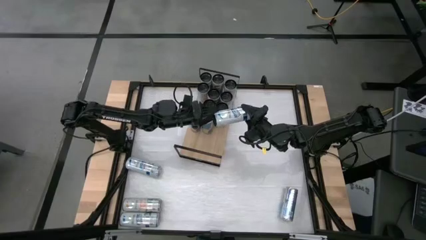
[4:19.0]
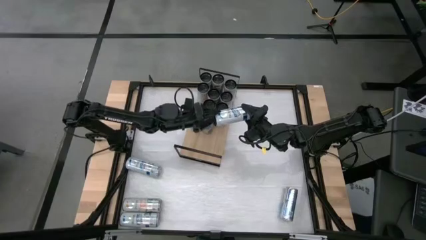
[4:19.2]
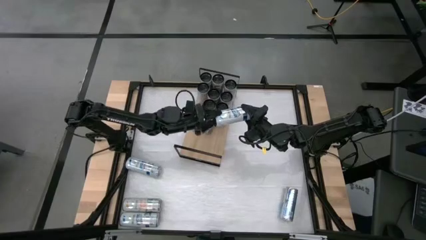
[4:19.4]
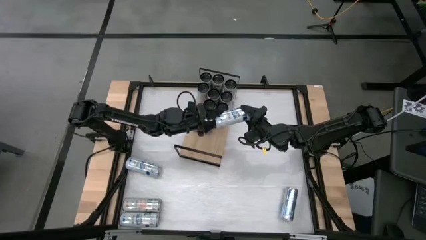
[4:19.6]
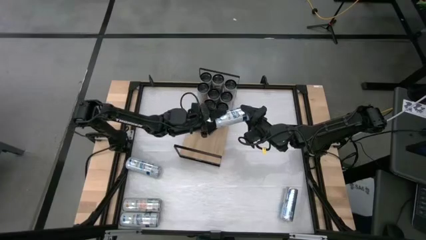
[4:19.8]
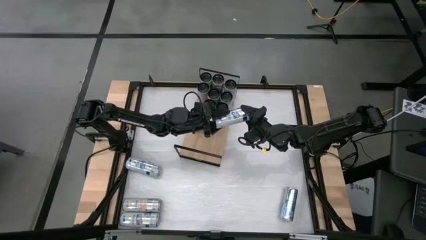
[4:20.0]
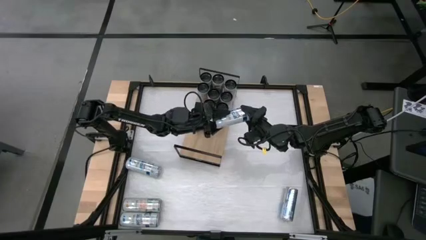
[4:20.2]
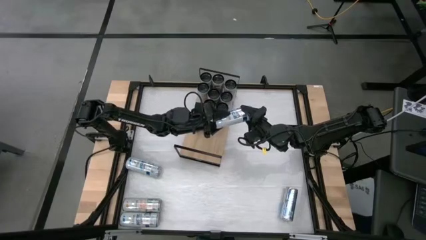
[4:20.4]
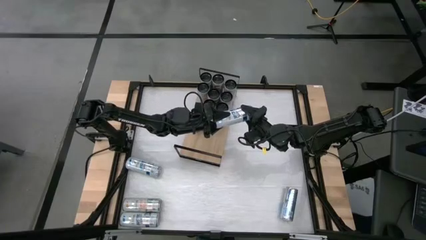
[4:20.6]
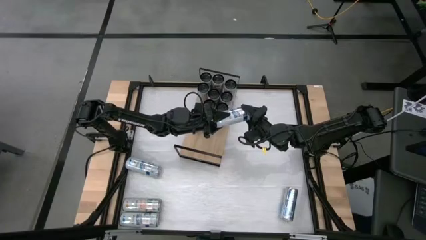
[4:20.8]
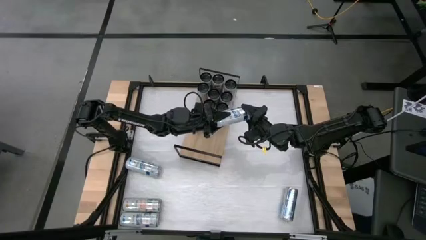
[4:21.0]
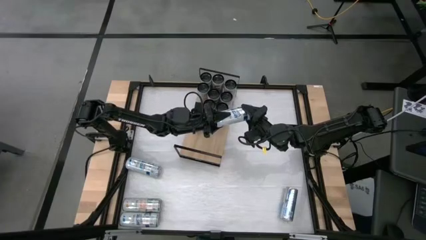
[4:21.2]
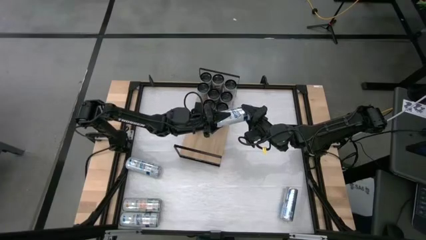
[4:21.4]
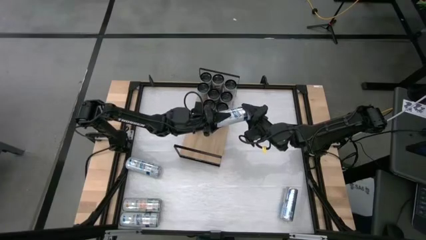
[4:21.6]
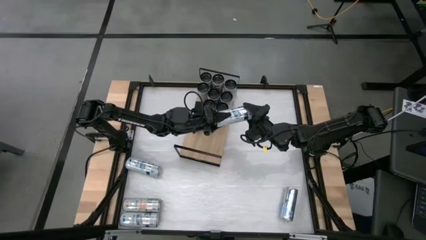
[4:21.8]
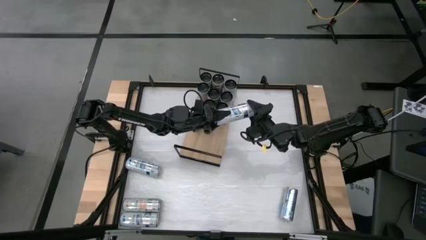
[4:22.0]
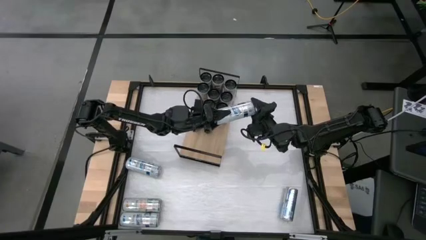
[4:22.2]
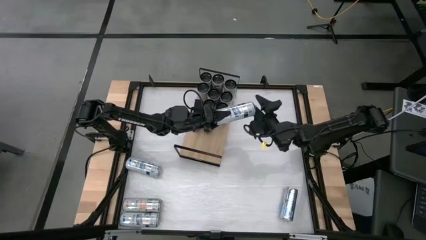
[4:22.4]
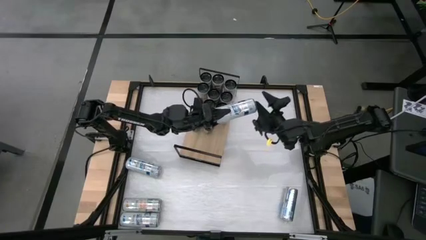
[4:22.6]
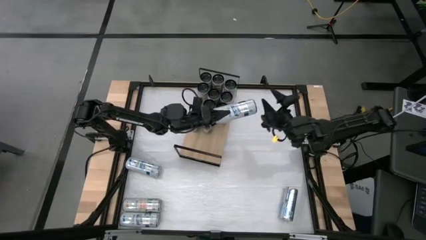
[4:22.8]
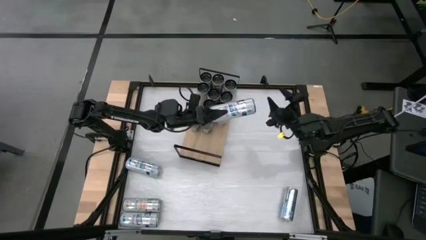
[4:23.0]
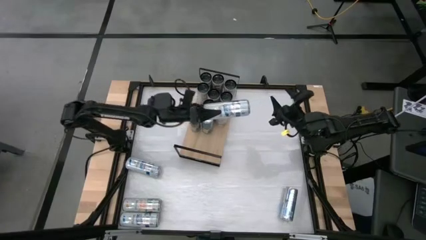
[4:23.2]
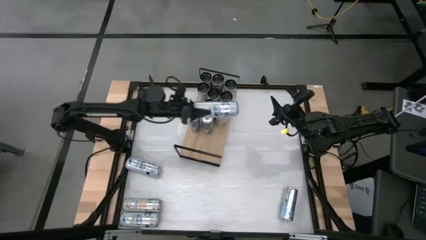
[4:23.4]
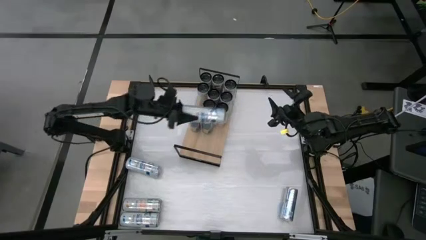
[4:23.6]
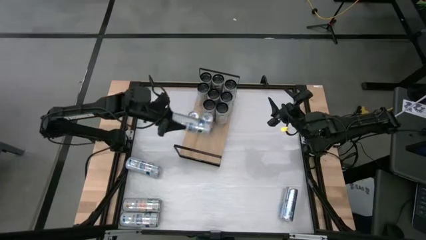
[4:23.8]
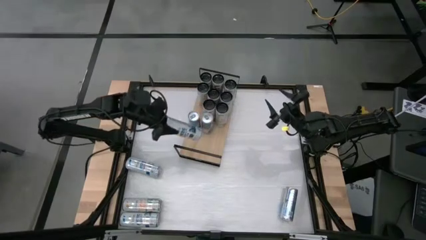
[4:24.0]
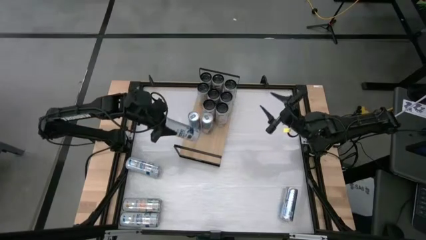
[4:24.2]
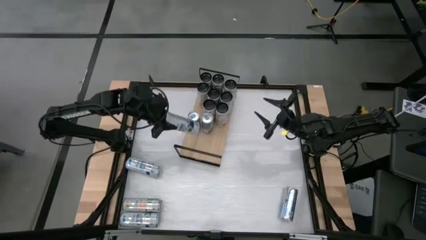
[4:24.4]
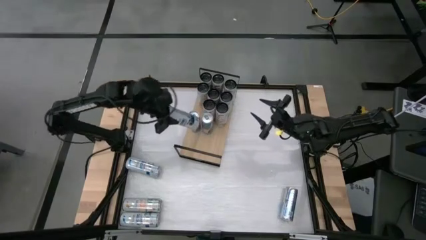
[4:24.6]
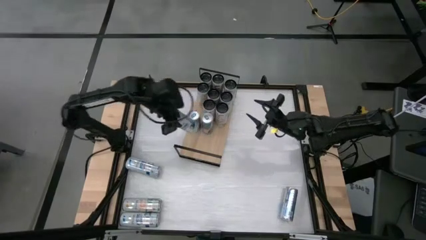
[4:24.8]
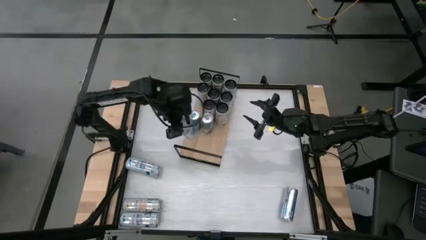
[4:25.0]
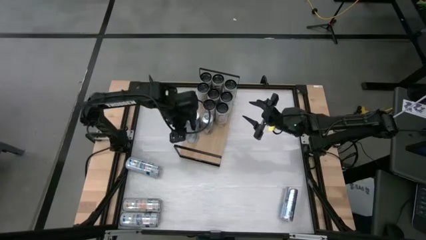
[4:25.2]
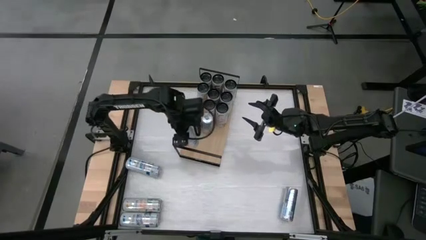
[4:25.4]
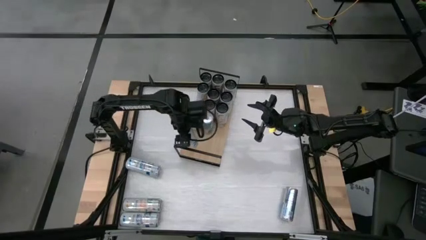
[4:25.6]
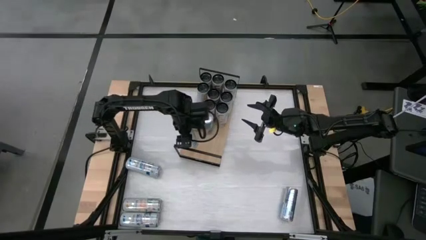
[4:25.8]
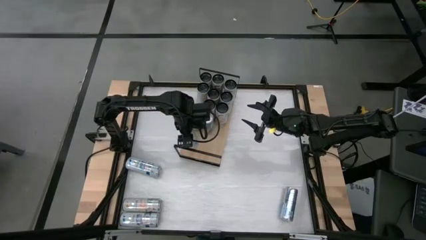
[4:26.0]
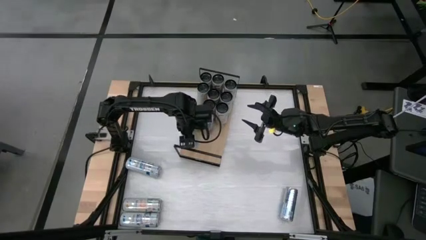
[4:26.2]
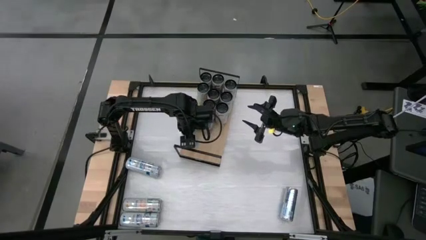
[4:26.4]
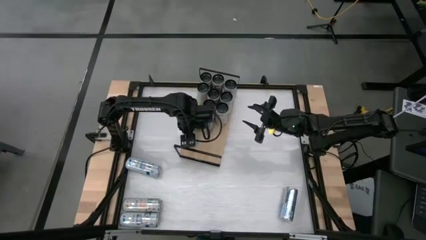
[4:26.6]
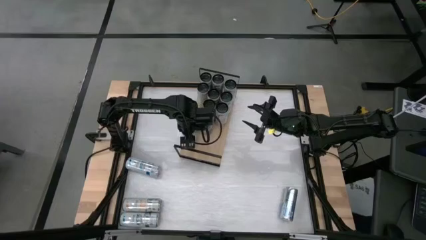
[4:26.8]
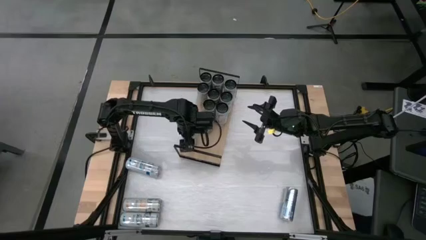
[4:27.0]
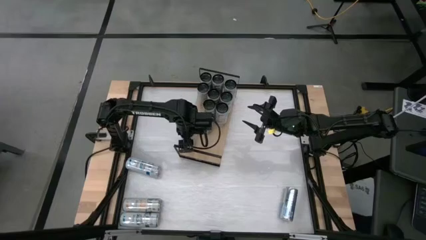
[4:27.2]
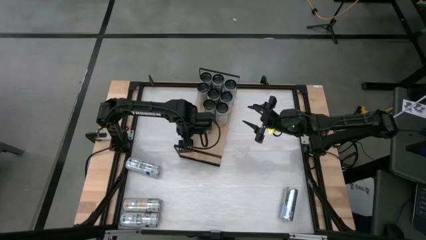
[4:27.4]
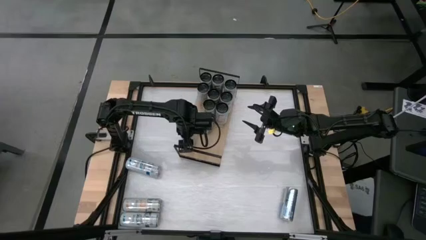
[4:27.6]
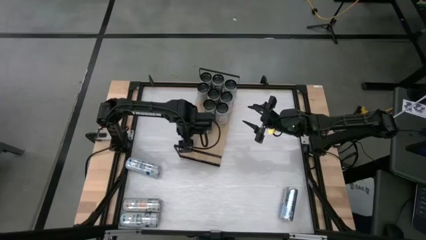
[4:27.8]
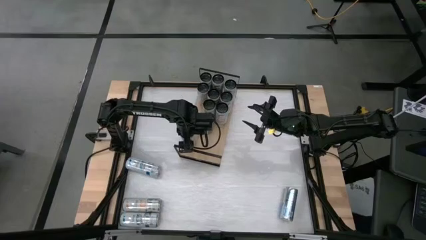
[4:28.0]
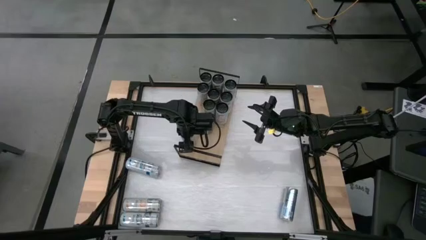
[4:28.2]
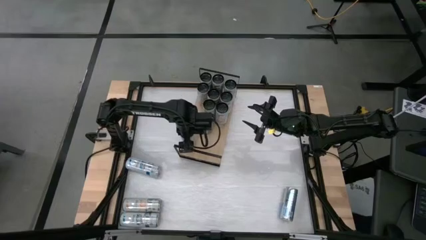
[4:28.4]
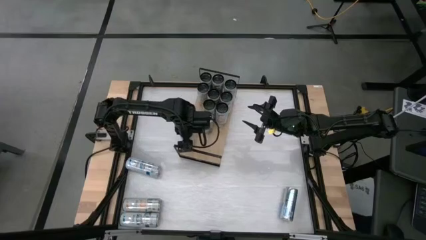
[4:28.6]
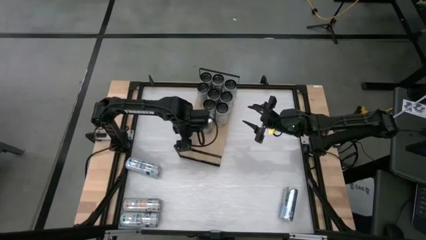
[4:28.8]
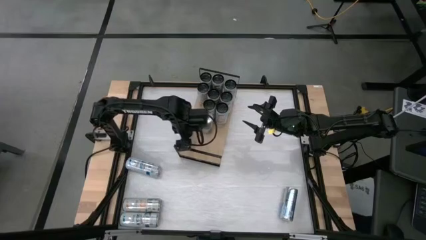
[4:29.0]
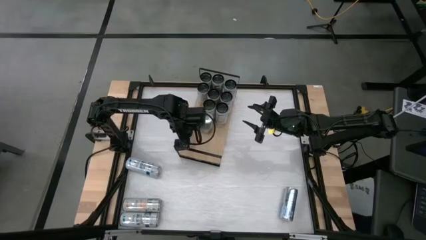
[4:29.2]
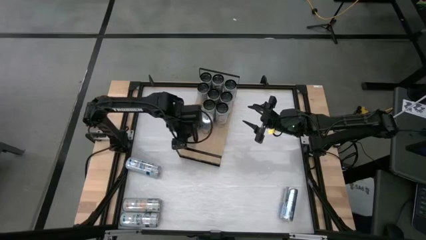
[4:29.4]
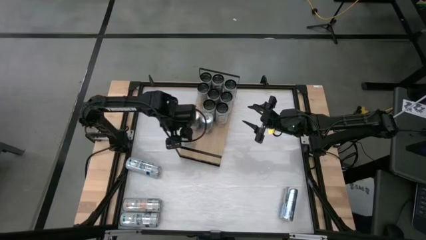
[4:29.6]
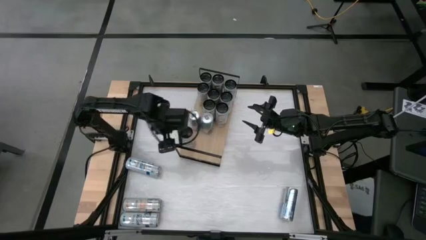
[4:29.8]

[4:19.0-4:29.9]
Task: Place canned beverage on shelf
Put the top right blue soda can on the shelf

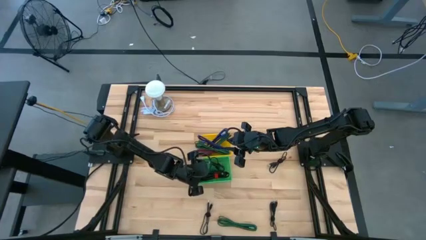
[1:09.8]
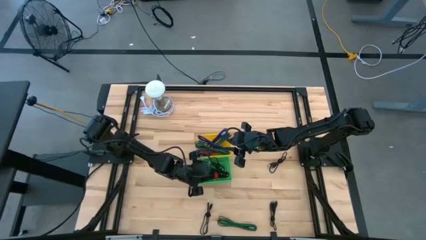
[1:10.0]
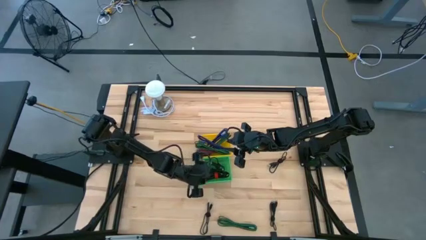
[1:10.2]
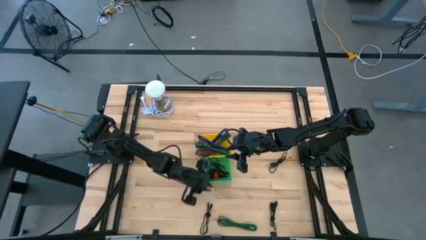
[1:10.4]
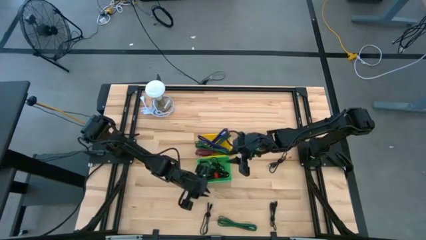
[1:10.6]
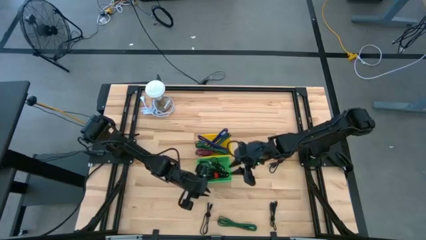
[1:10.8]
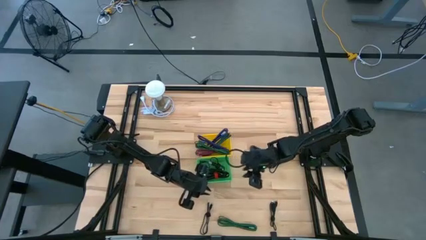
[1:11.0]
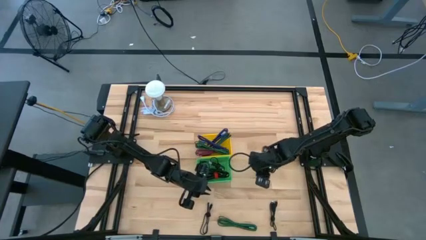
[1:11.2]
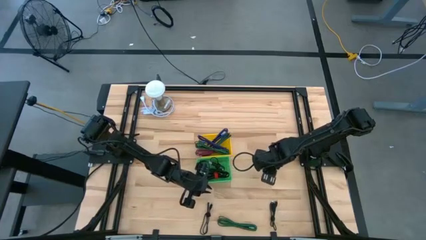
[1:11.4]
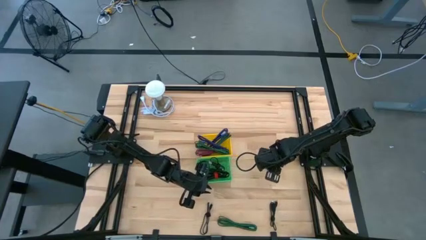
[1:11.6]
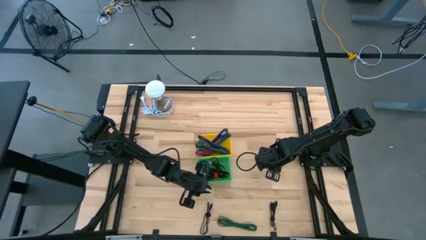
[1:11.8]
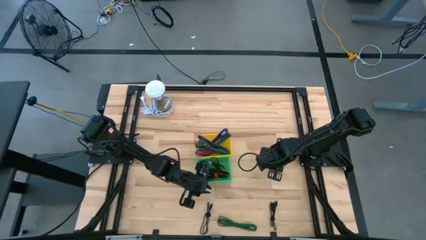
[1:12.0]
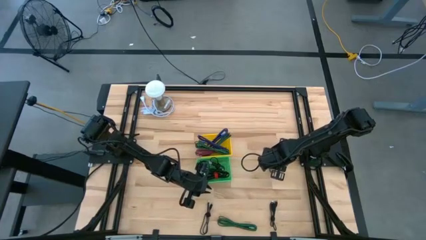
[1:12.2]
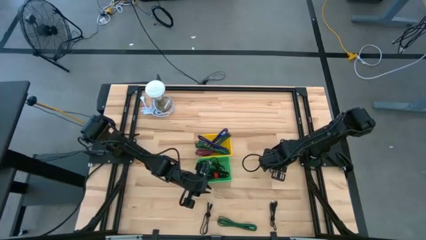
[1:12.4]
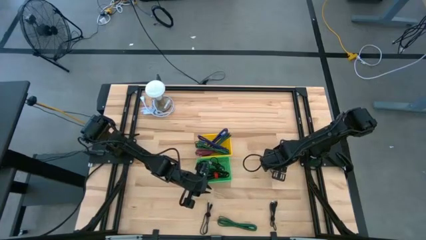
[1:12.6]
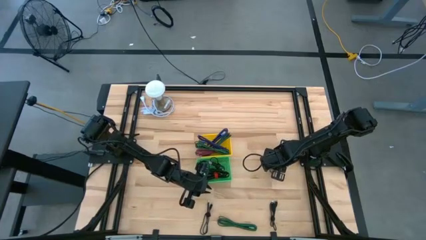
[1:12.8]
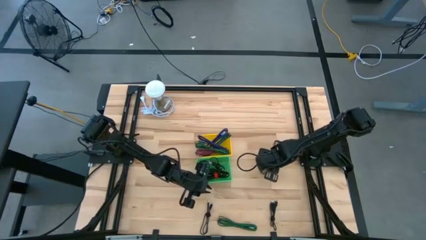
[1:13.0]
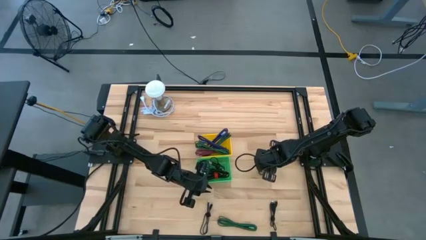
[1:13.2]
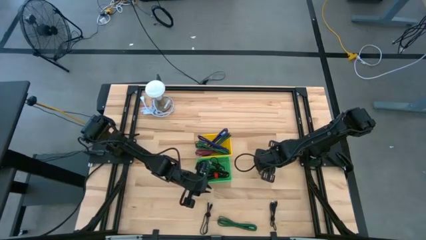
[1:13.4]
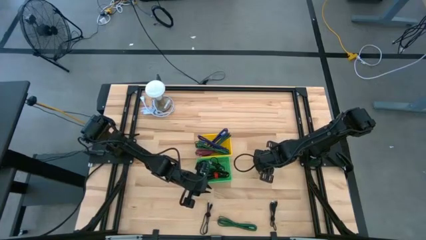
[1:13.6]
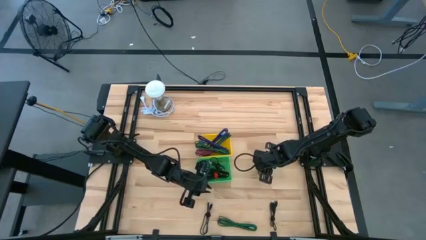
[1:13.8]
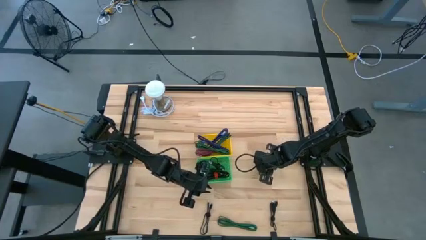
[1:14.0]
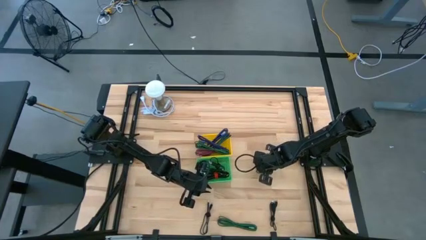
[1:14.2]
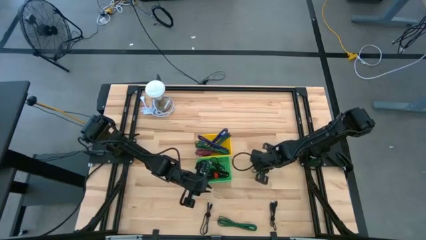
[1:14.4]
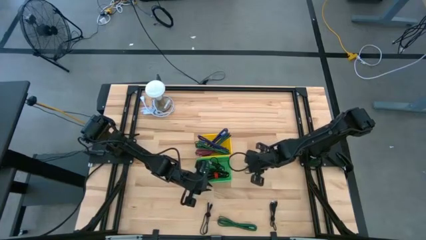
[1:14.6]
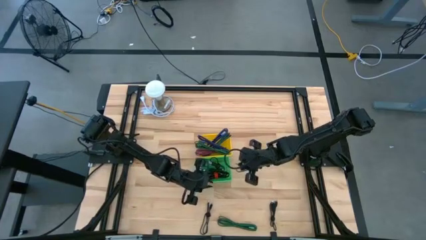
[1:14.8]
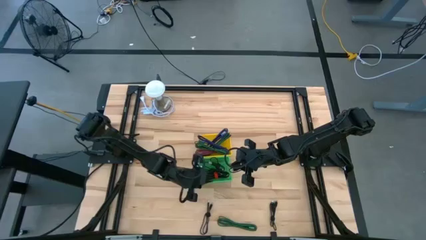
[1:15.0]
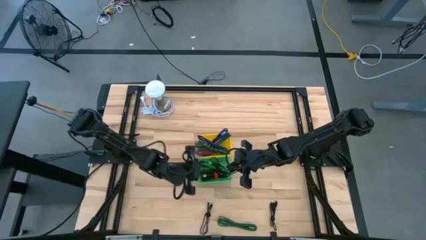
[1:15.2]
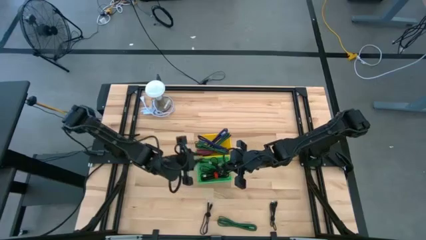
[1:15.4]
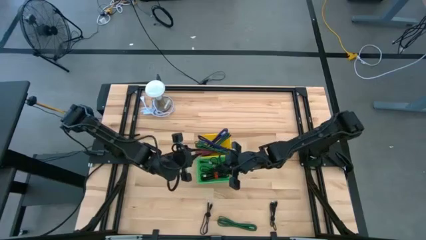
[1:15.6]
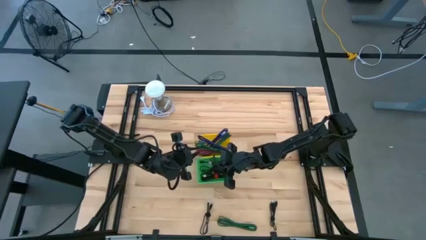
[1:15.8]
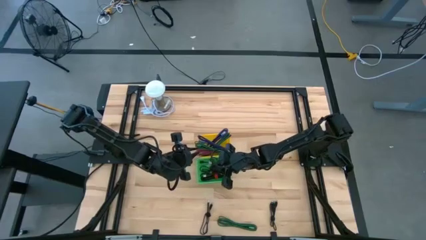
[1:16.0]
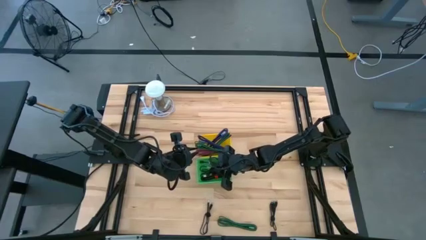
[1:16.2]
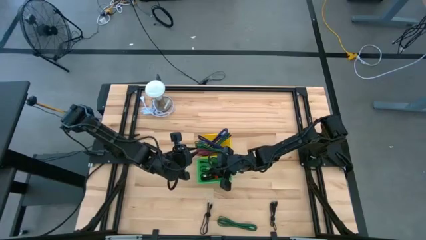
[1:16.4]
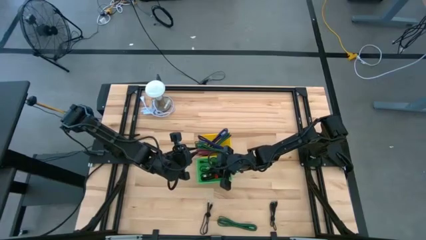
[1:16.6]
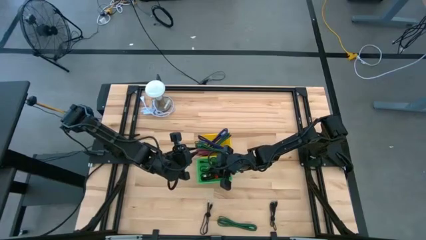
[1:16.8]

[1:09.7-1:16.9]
Task: Pick & Place USB Port
Put the black USB cable into the green bin
